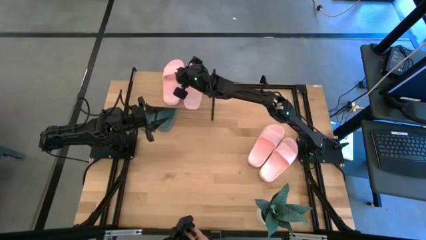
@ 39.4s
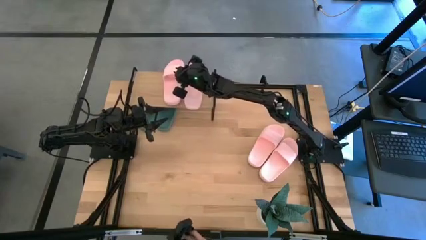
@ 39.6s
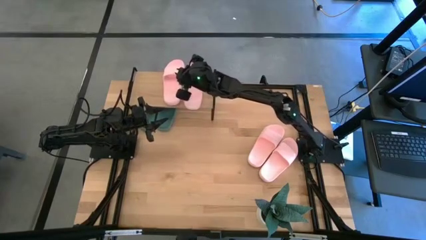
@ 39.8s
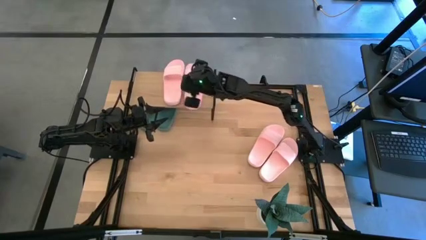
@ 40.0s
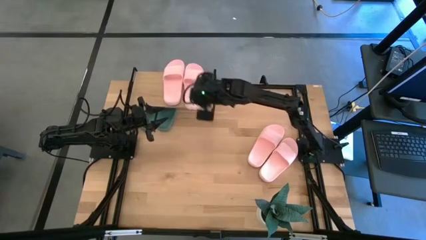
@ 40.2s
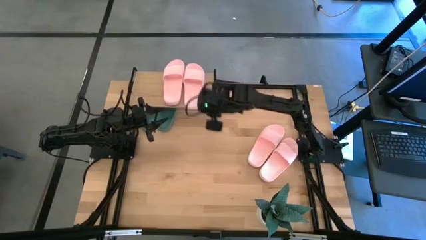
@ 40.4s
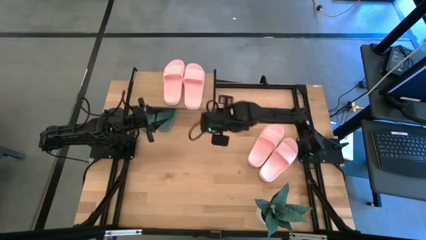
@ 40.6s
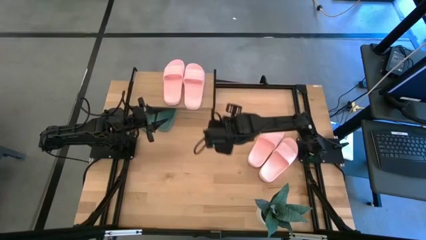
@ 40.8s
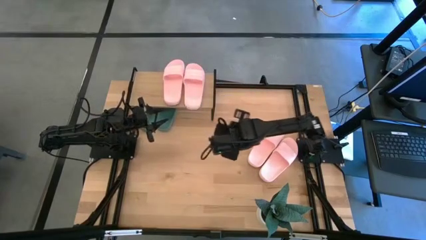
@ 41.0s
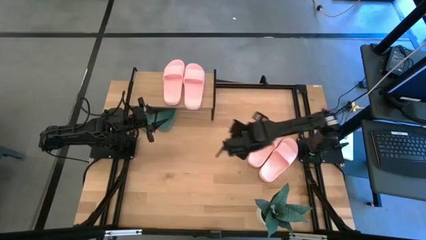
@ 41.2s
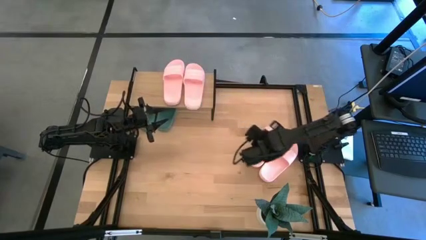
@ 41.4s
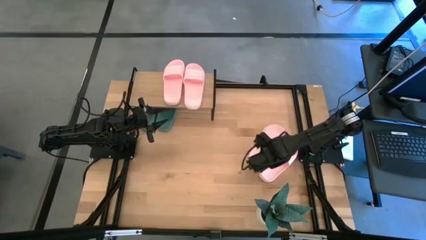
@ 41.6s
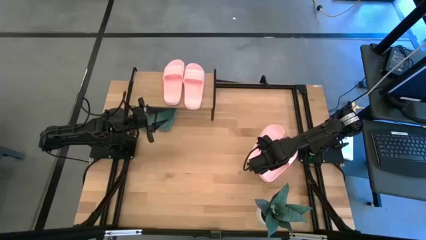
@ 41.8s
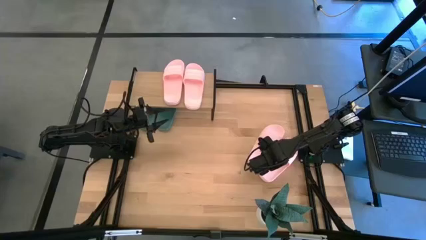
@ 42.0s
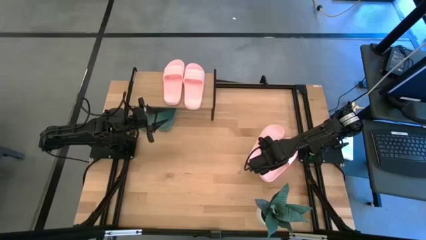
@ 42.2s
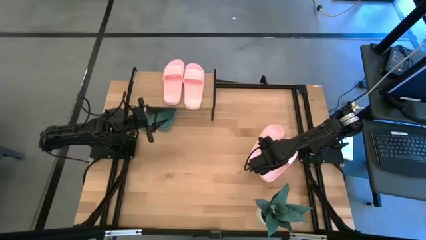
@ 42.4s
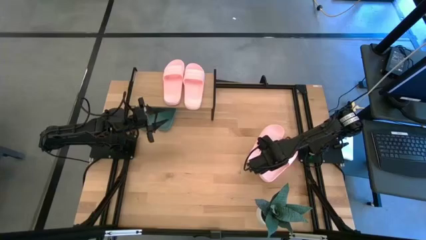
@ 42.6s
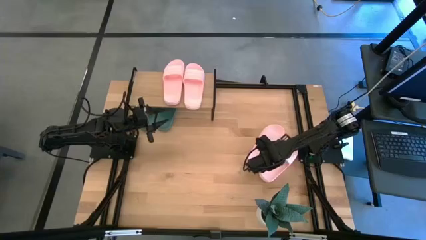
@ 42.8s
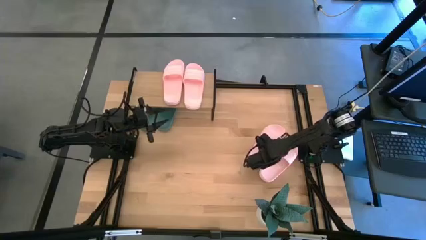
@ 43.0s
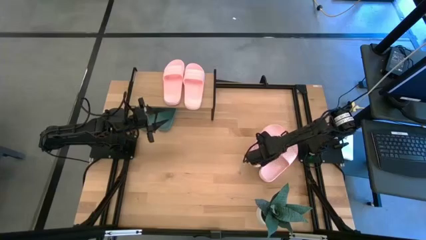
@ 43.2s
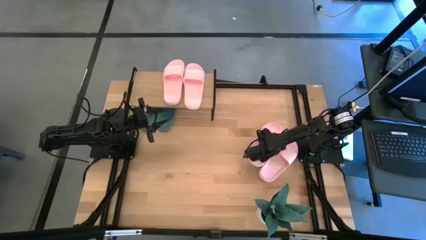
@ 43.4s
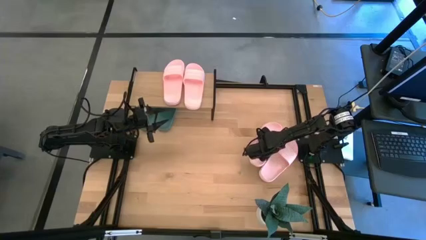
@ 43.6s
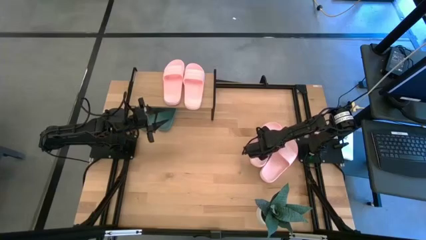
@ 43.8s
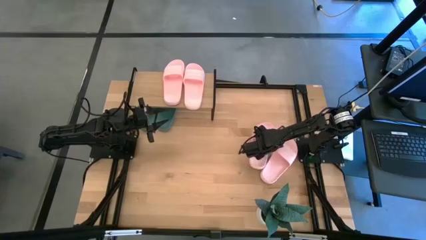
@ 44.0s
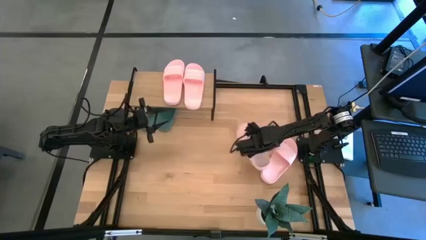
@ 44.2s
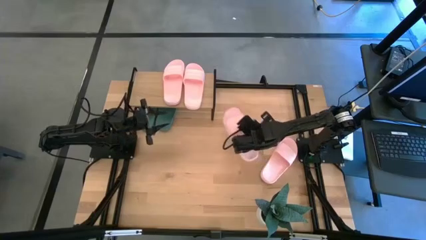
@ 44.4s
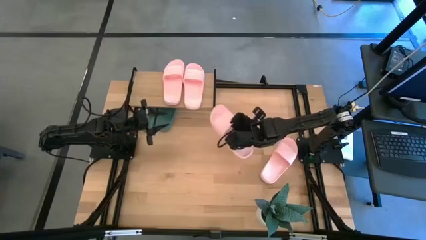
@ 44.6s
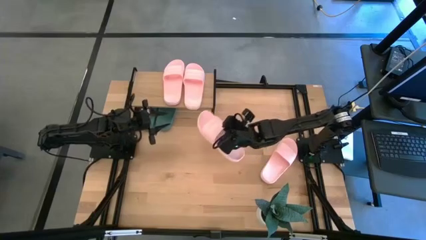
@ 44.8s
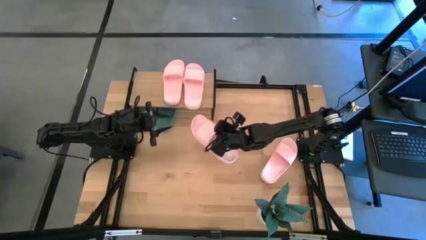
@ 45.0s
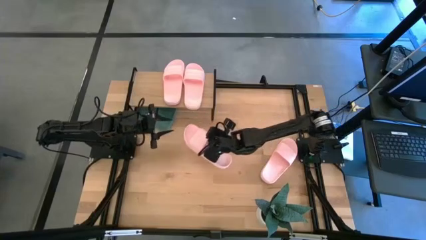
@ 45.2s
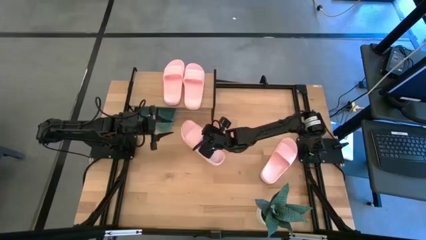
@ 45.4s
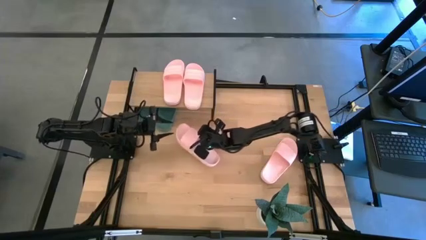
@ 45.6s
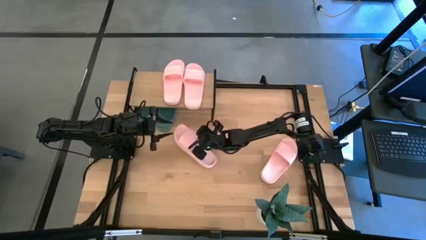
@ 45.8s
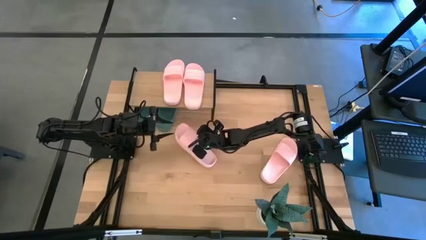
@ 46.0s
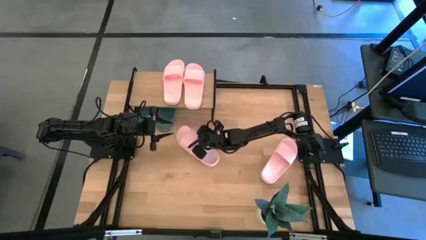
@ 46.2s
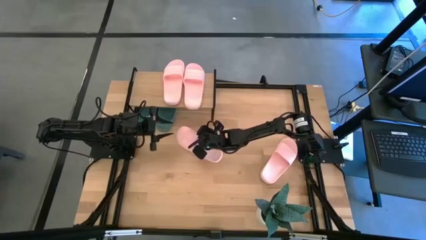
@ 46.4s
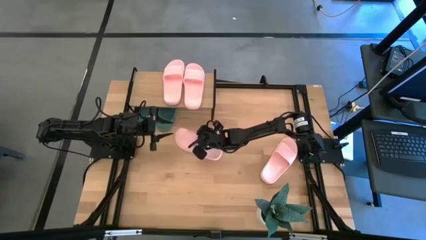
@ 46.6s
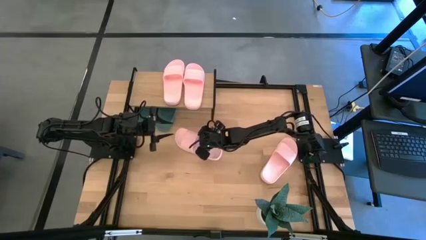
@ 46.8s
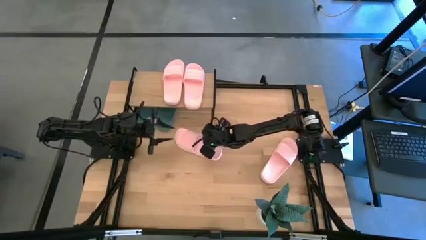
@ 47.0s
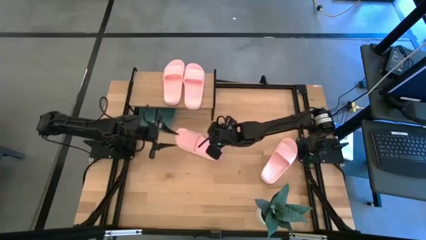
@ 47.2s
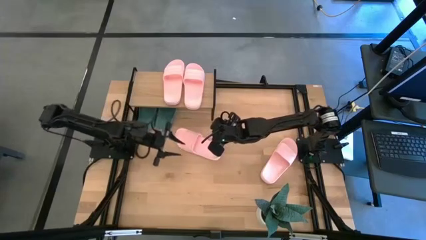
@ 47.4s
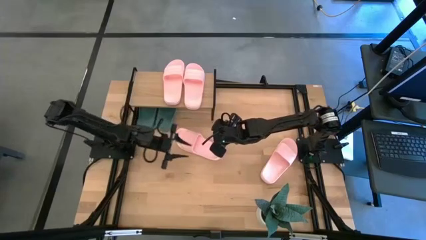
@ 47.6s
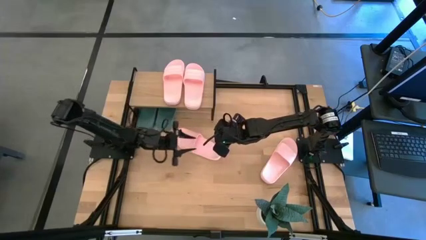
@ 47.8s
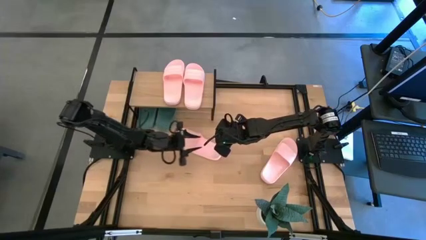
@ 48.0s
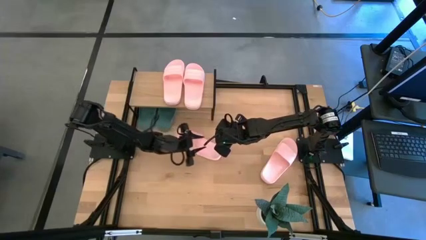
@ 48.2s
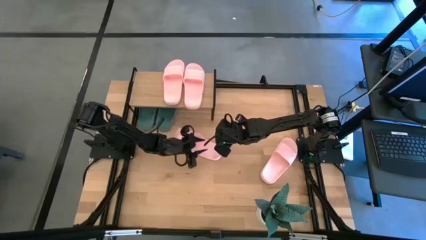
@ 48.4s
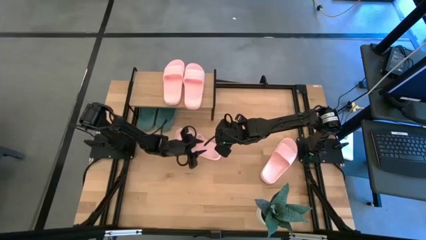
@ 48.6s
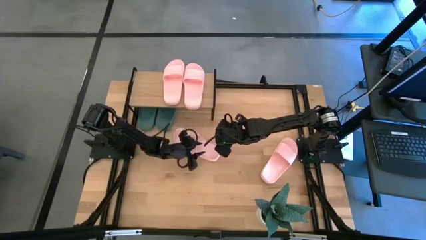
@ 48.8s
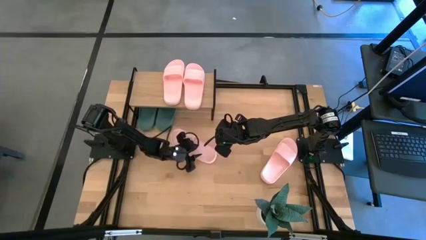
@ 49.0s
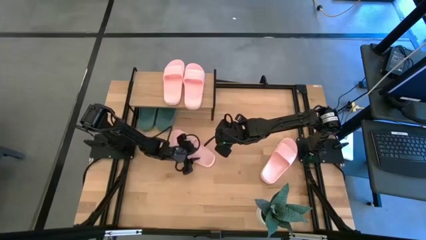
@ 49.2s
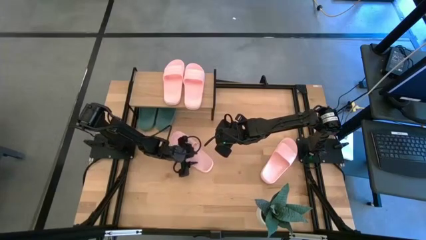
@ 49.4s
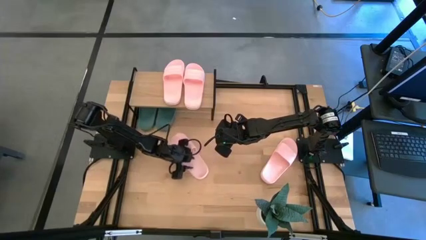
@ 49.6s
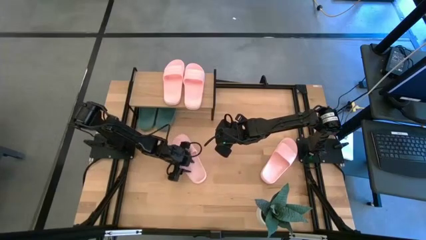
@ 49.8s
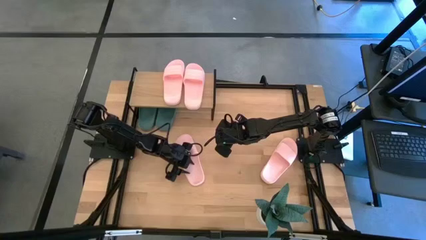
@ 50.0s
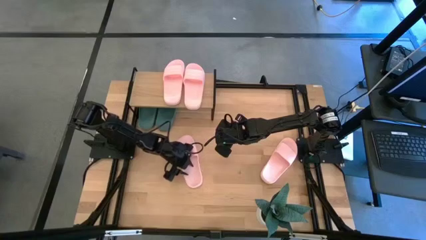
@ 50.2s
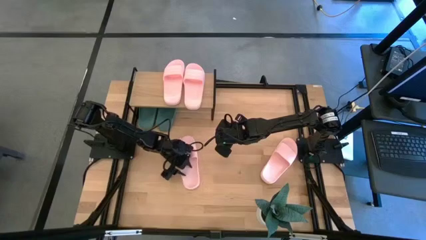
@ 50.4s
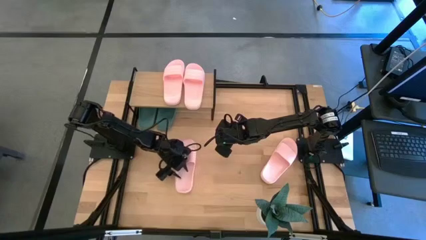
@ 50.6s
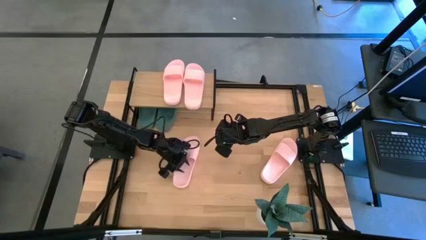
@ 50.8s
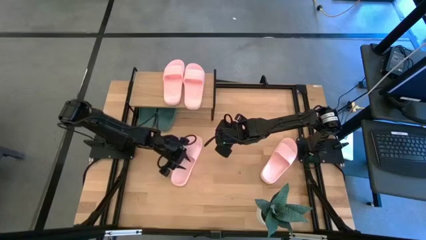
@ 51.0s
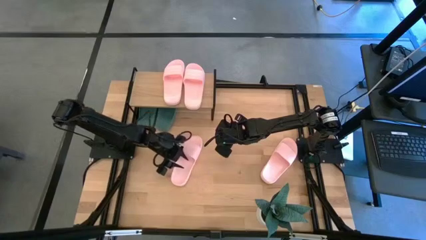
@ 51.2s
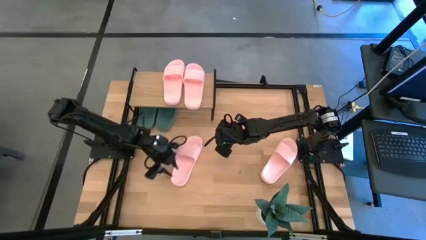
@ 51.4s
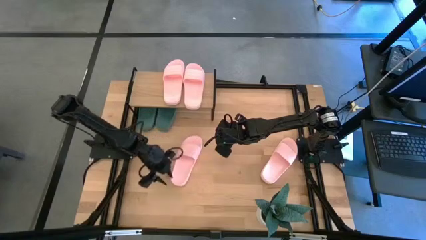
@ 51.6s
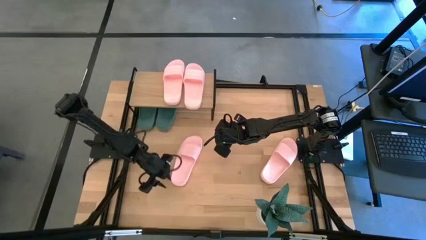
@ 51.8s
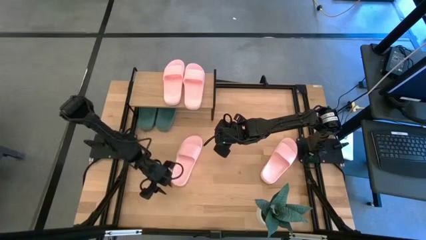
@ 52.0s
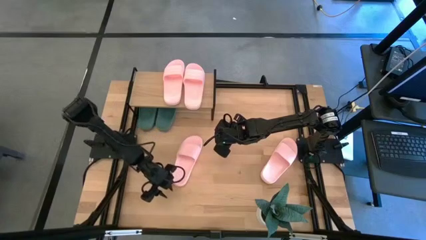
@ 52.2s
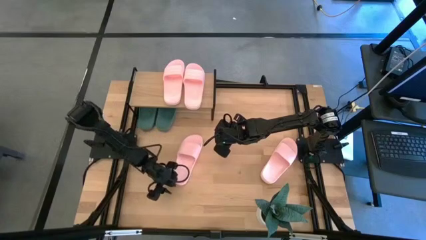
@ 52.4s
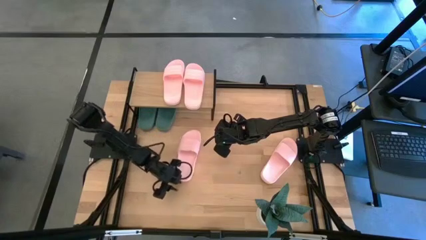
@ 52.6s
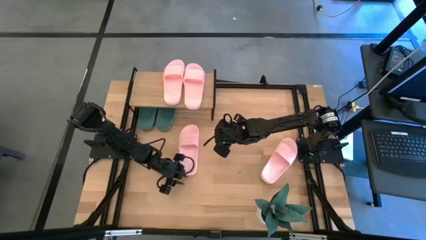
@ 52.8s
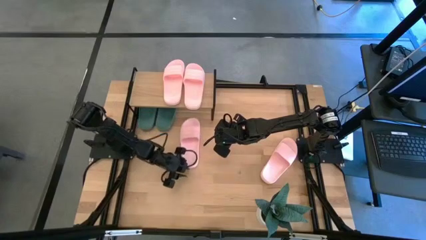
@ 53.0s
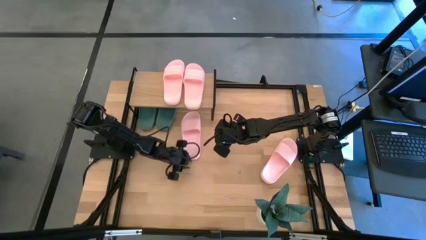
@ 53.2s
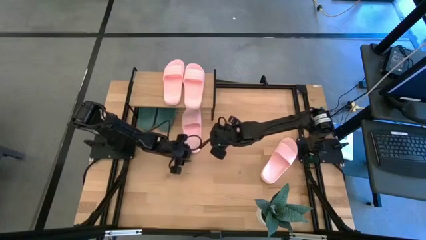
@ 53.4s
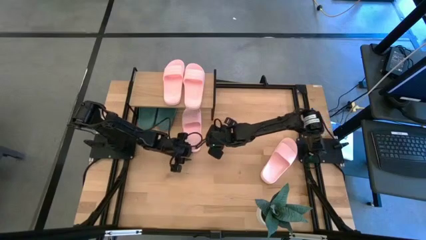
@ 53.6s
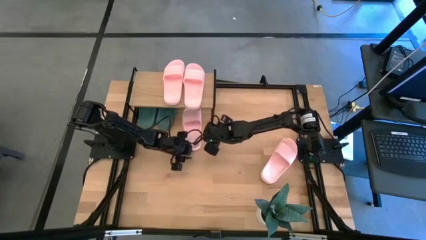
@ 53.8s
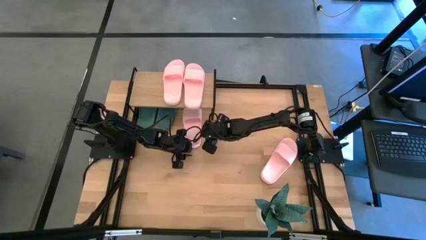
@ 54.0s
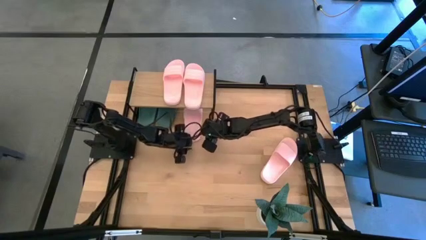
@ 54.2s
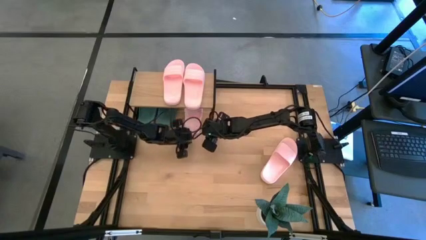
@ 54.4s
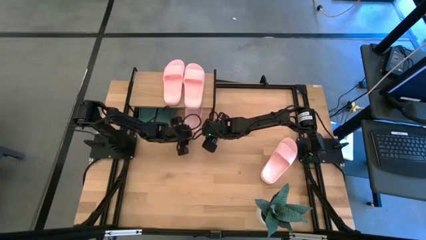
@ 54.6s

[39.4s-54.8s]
Task: Pick and place slides into the shelf
Put the pink slide under the shelf

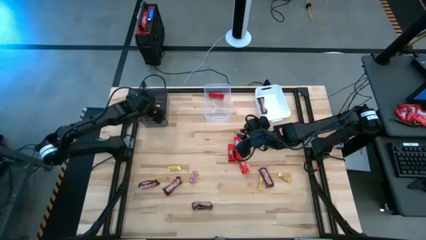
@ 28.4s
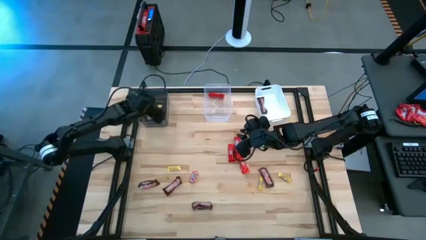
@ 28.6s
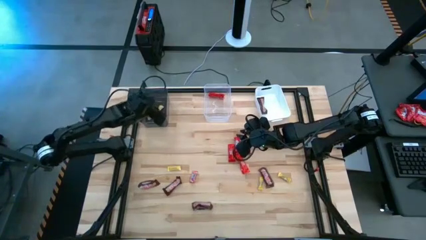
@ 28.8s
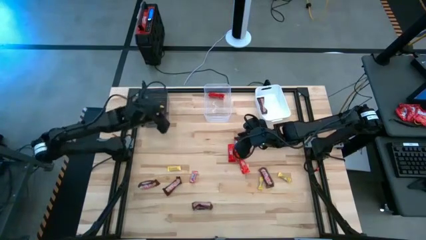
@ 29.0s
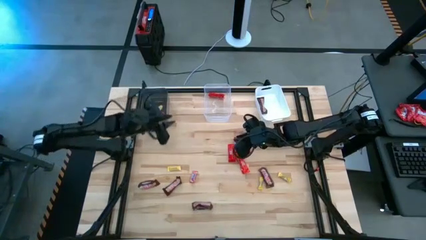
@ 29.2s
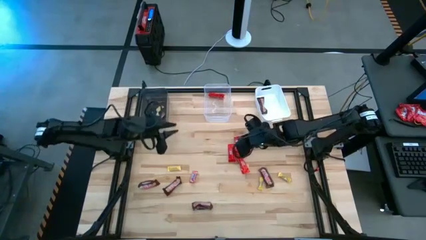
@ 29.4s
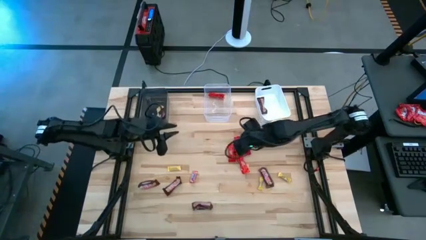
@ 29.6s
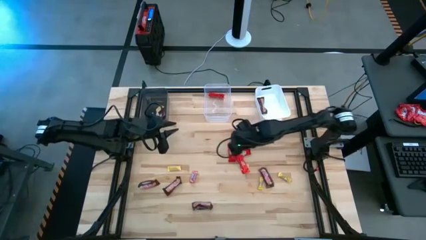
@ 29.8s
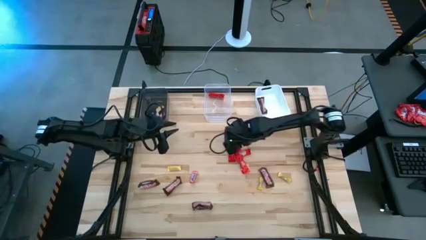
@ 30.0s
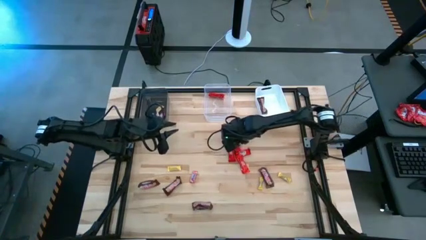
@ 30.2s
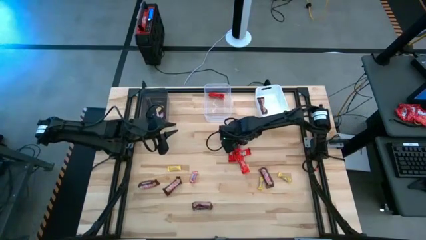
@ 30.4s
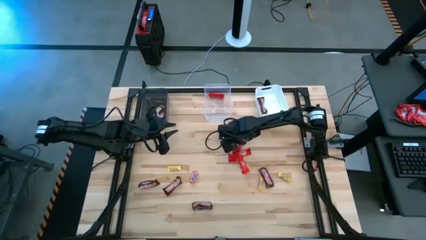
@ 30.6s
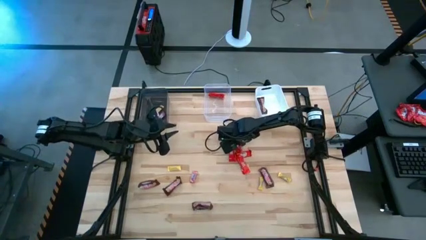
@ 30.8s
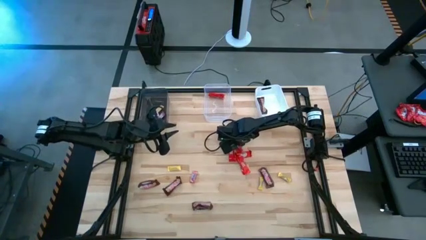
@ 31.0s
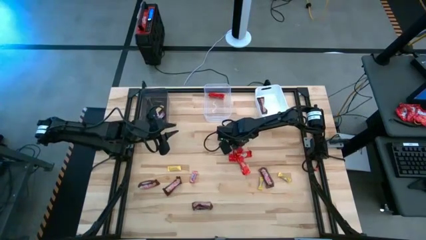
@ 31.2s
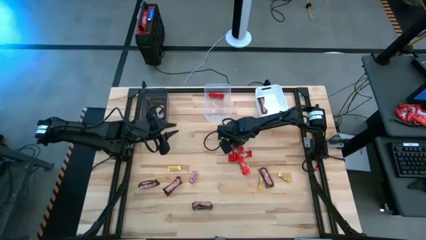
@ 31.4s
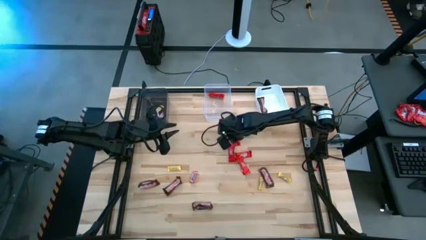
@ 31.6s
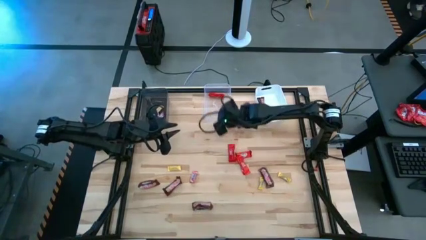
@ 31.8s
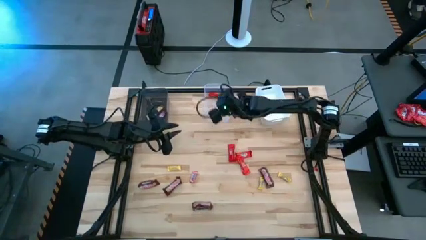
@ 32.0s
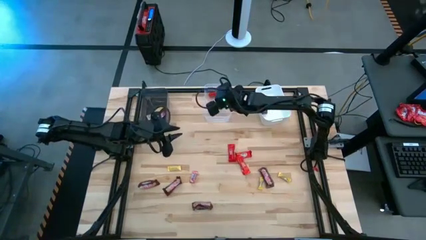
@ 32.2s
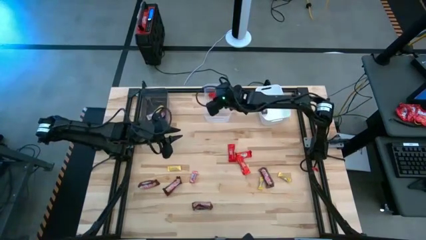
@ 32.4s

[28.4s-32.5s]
Task: Sort candy by brand, put in halloween buckets
Put the red chocolate bar into the transparent bin
